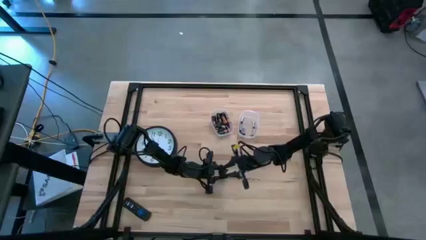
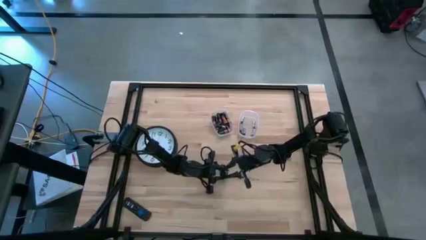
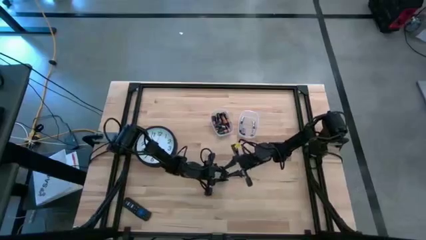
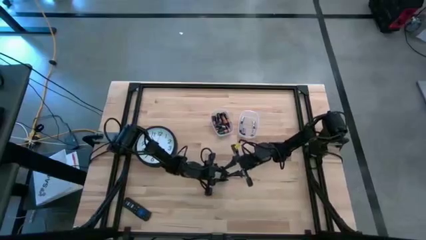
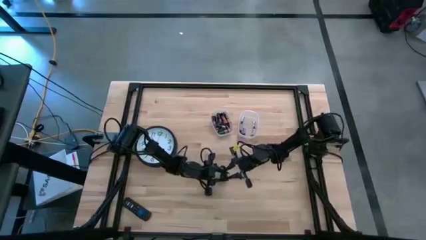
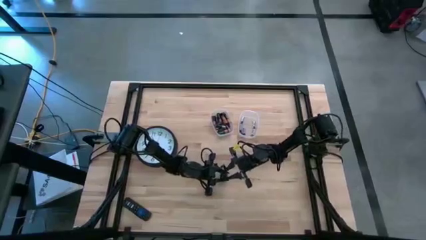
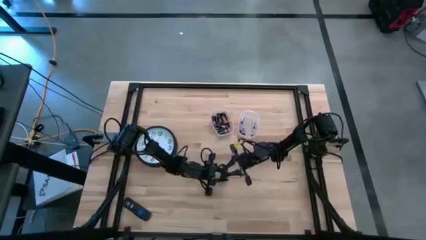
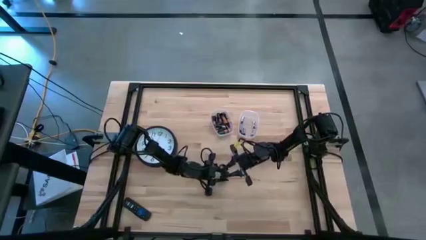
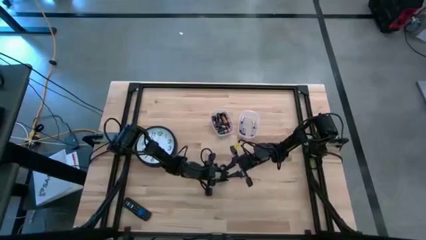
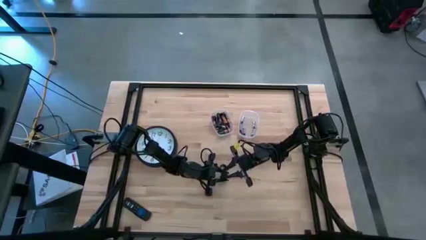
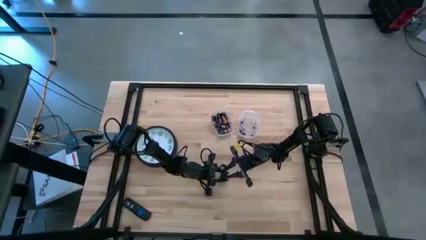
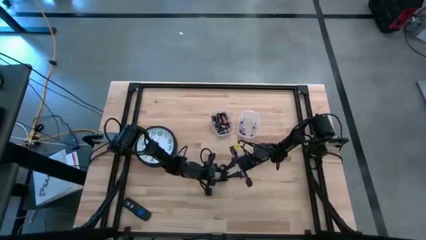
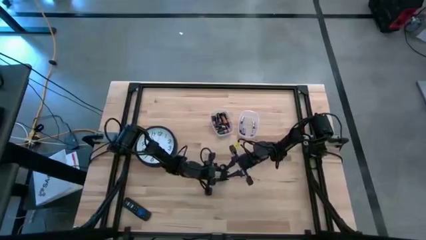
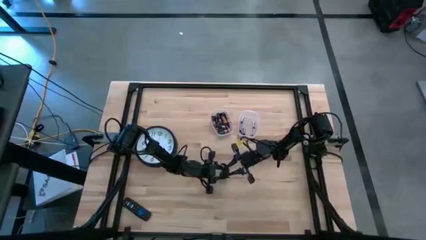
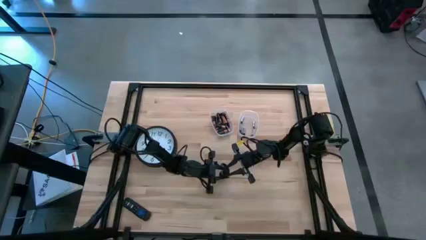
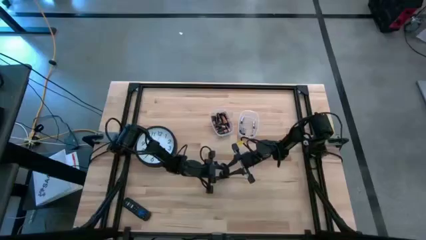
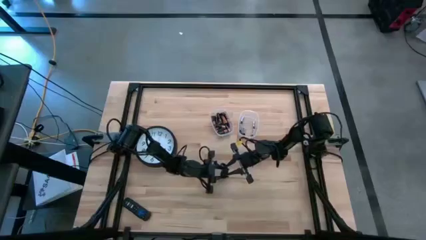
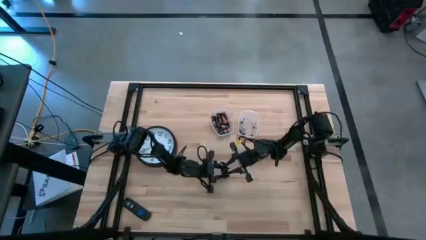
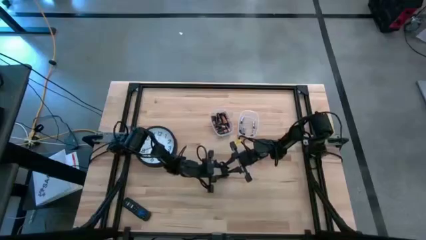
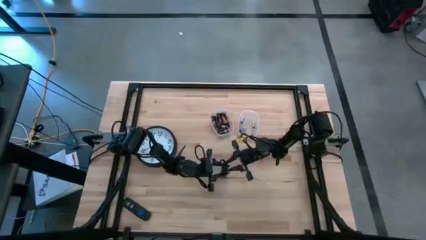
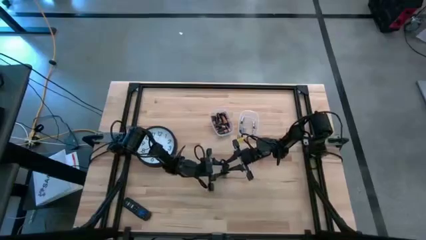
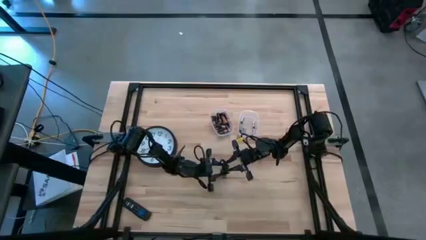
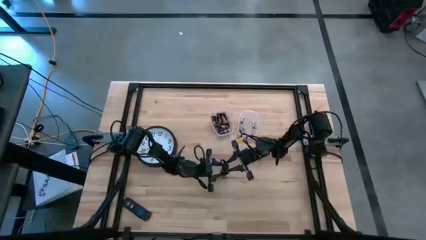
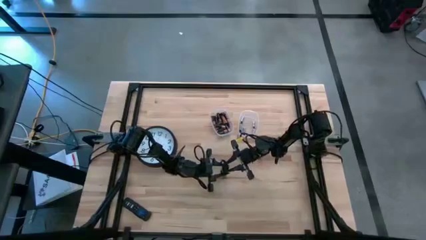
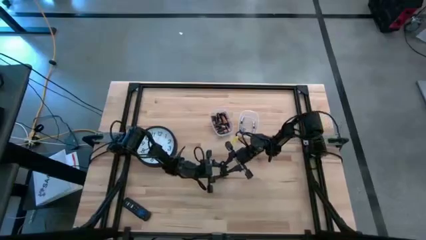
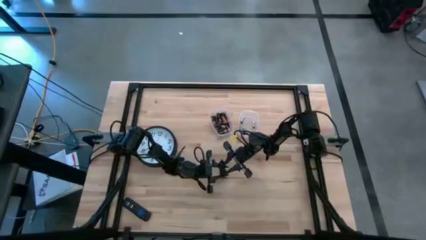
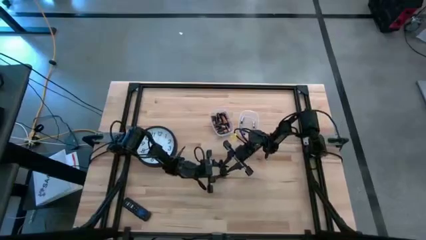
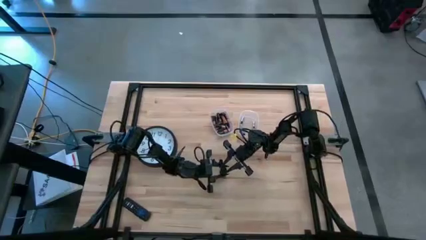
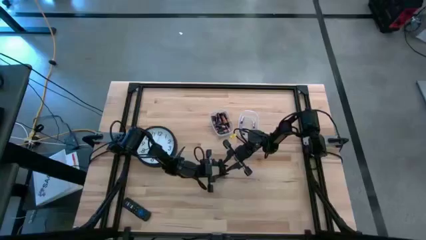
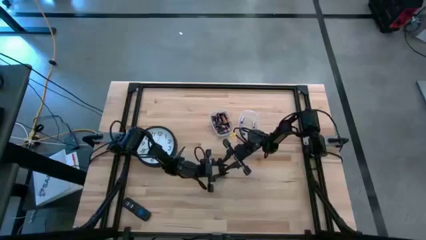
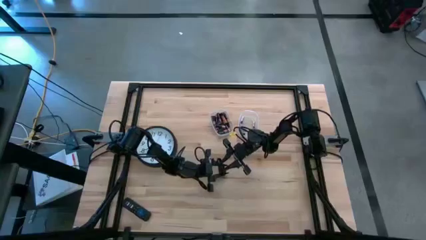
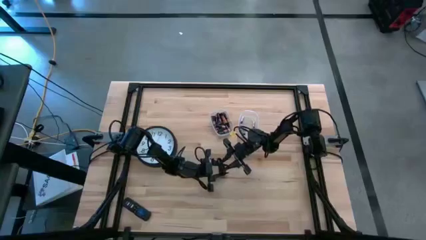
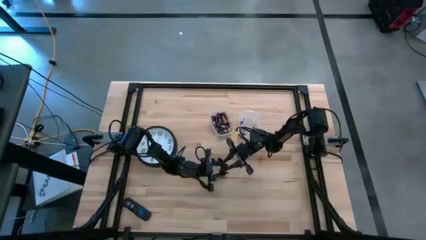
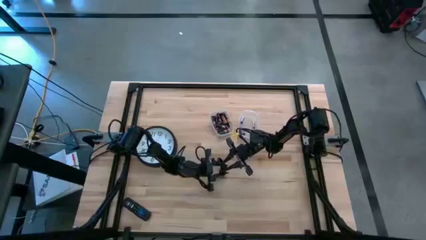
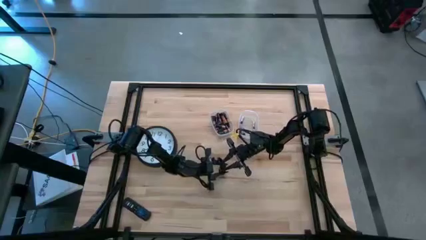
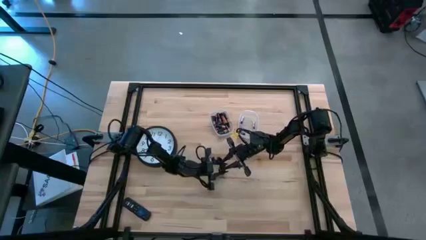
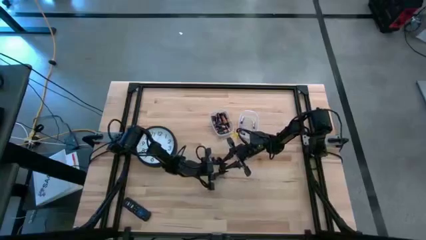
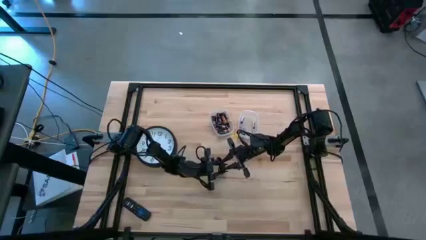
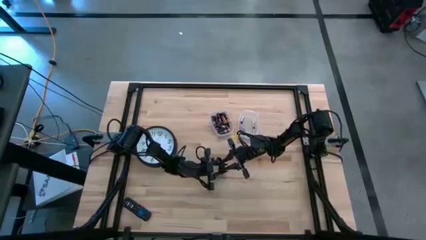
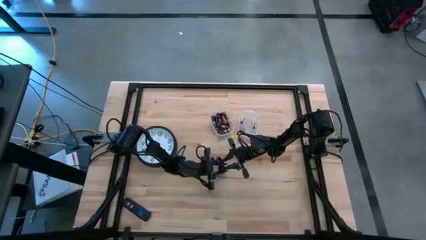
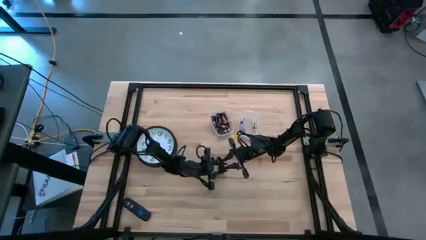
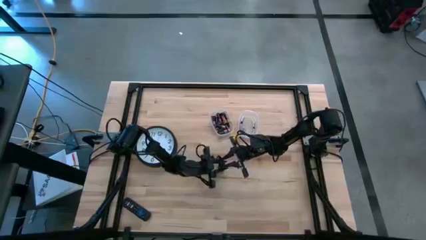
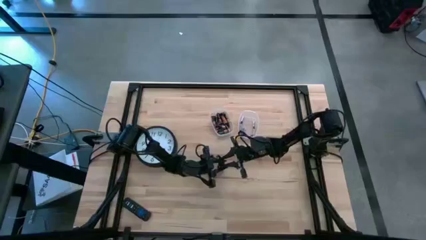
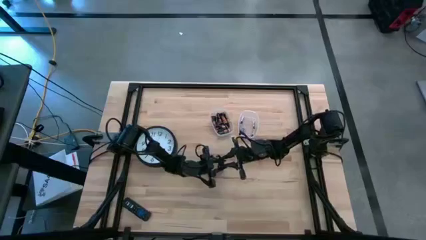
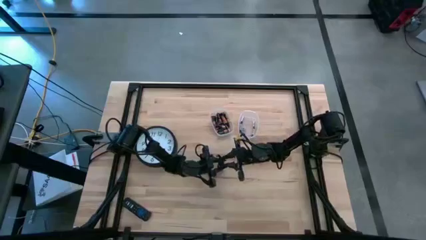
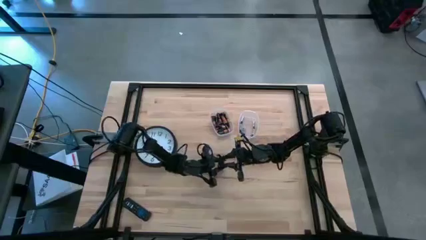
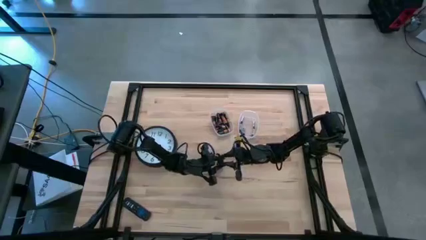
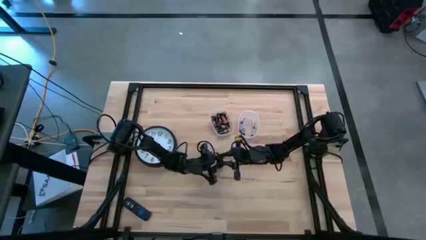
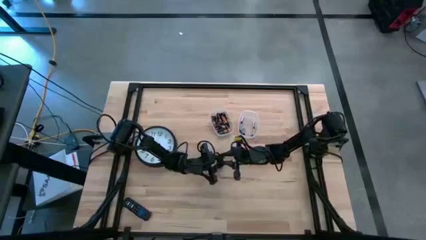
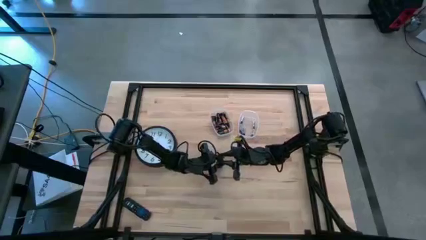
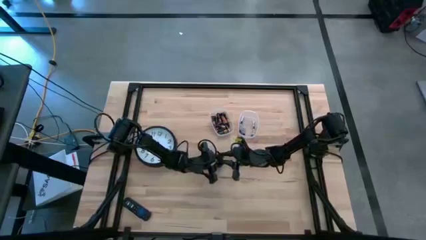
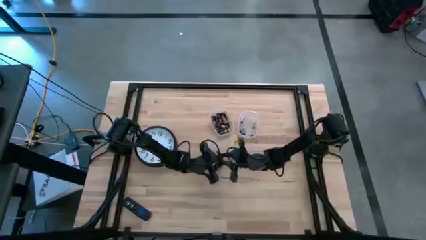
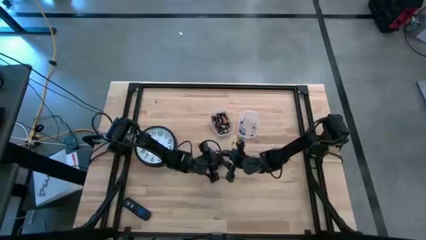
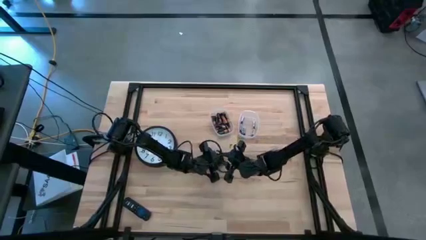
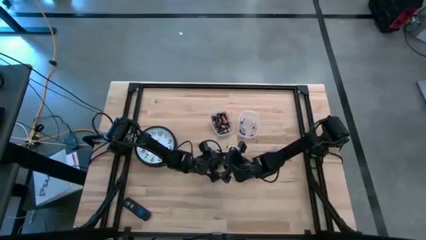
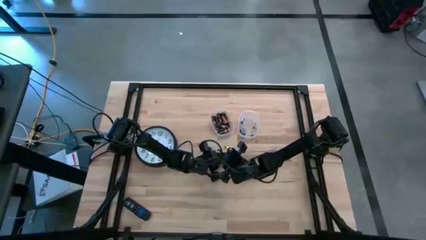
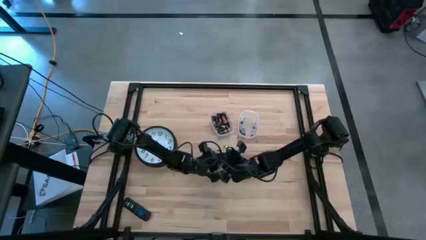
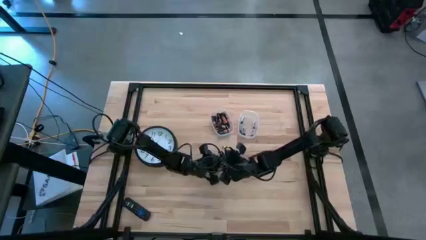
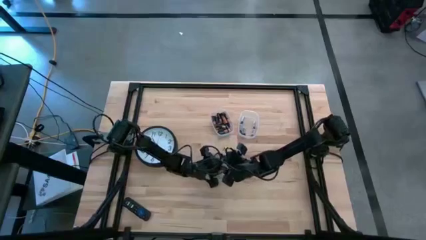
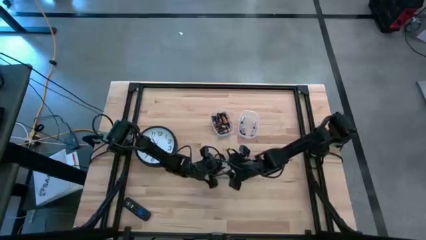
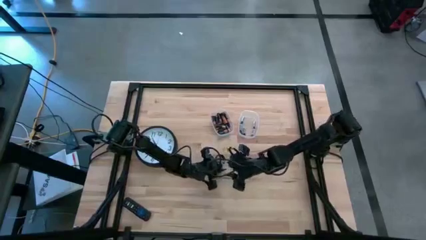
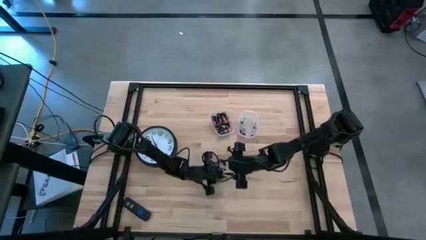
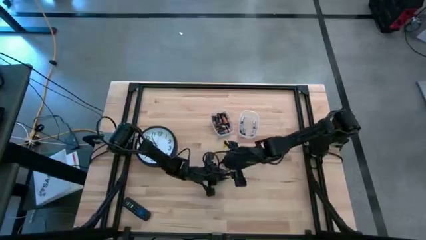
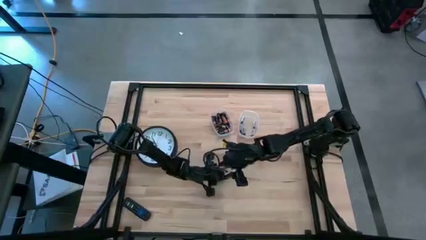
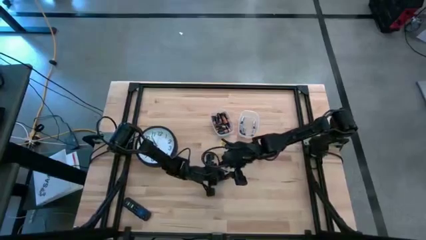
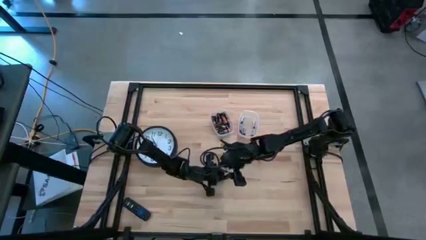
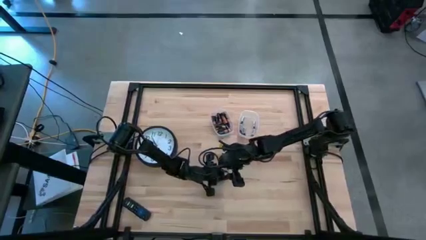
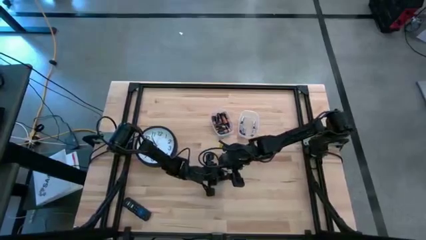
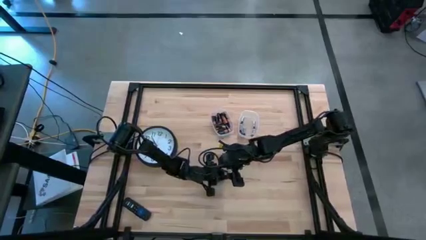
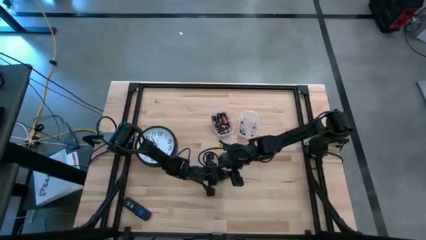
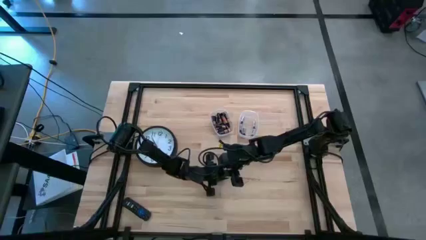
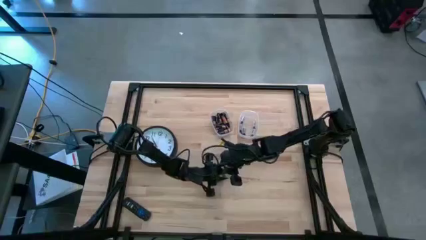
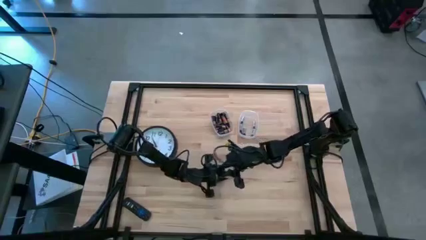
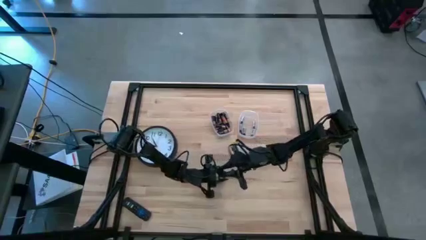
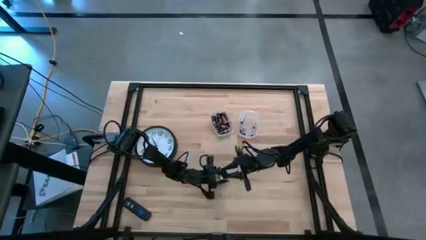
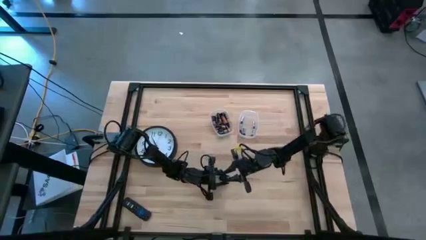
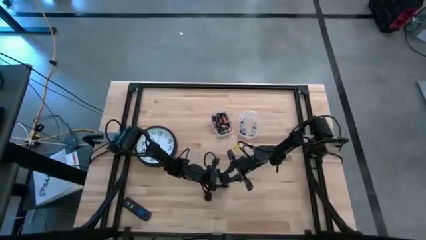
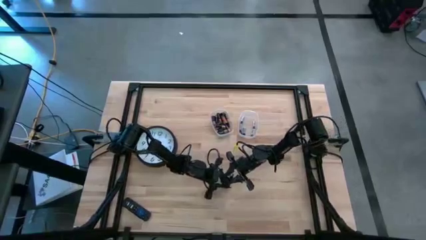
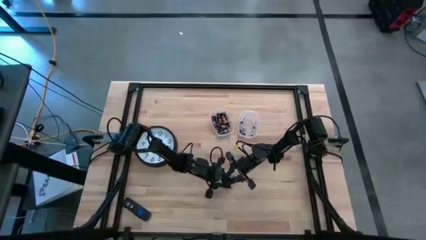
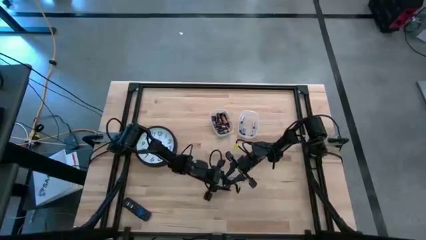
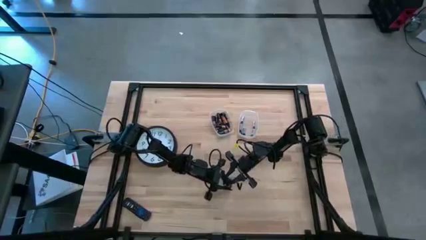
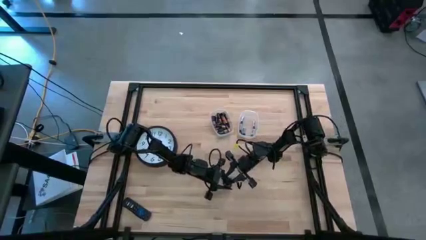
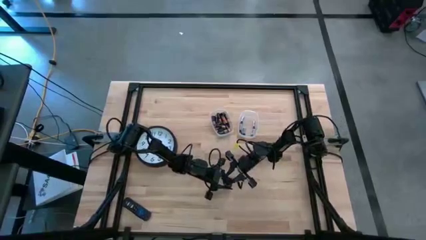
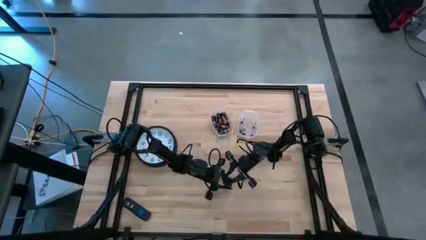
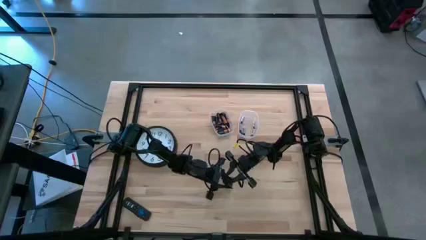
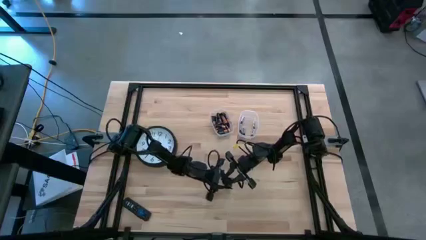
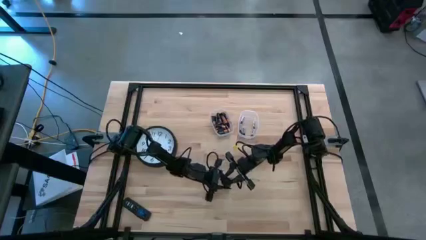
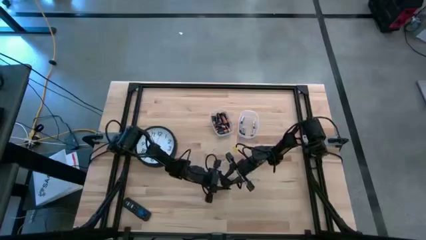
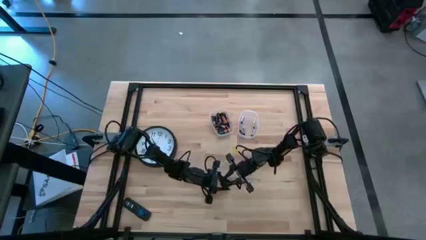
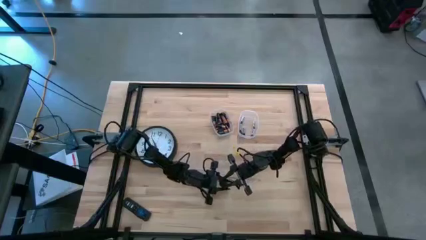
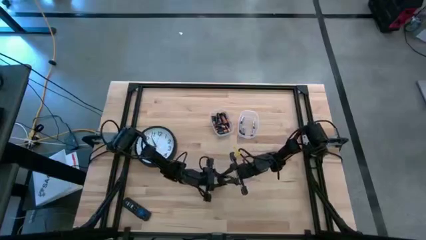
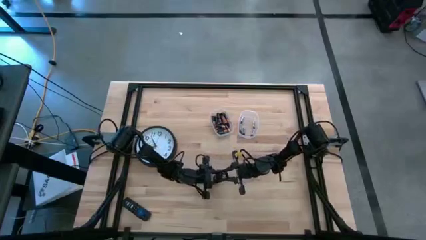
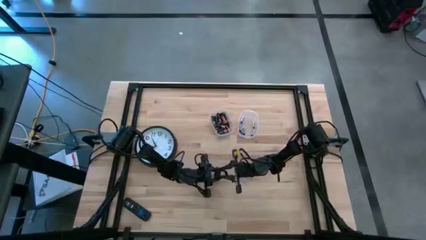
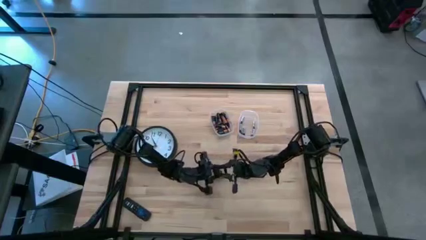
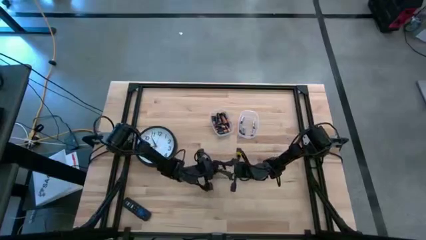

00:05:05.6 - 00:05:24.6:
Task: Insert battery
Close the lid of the black flashlight
